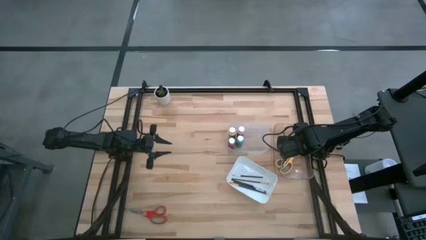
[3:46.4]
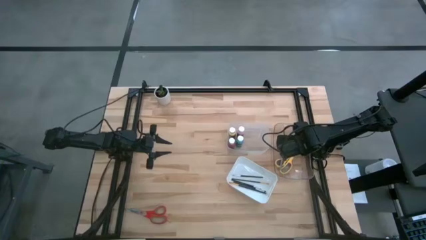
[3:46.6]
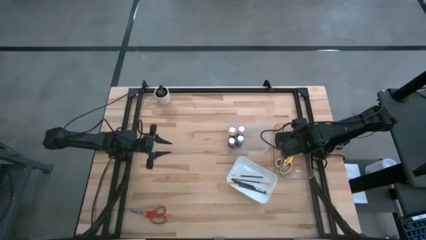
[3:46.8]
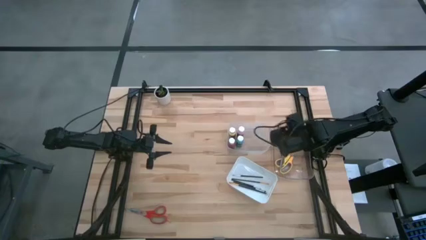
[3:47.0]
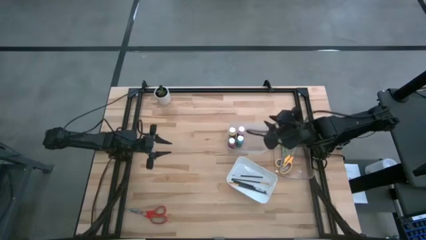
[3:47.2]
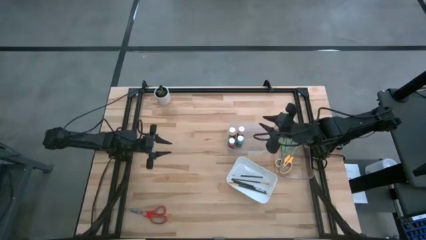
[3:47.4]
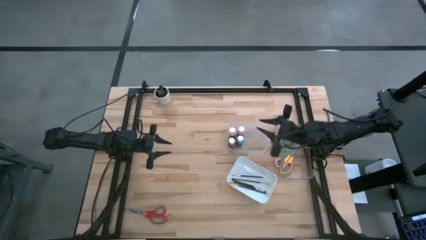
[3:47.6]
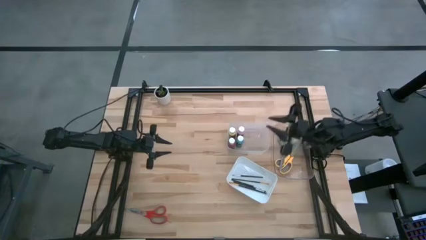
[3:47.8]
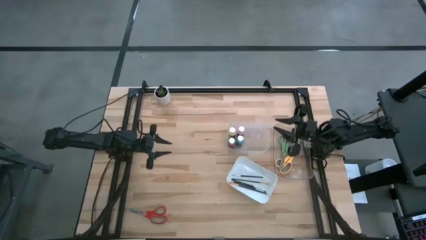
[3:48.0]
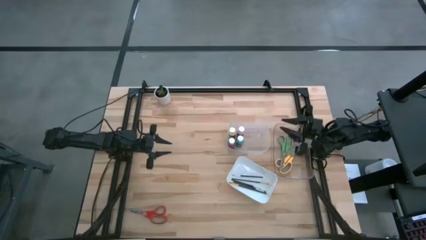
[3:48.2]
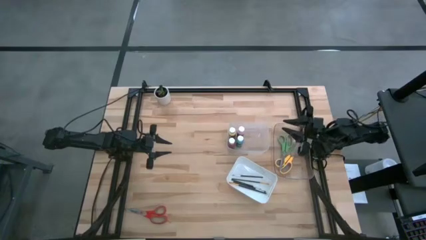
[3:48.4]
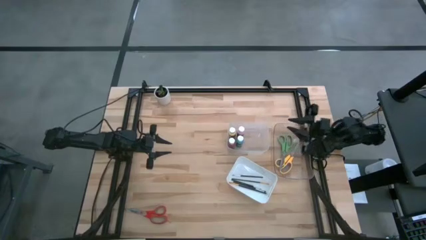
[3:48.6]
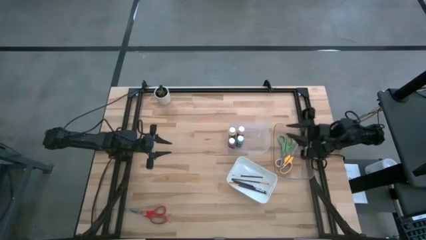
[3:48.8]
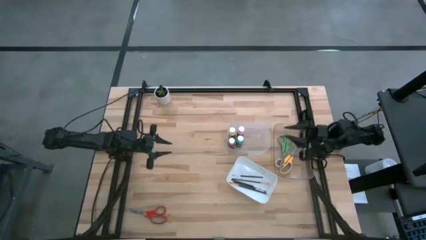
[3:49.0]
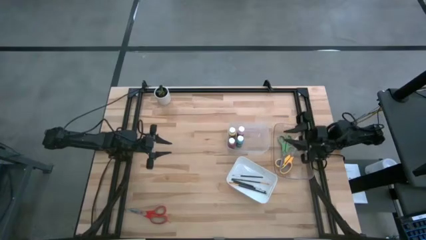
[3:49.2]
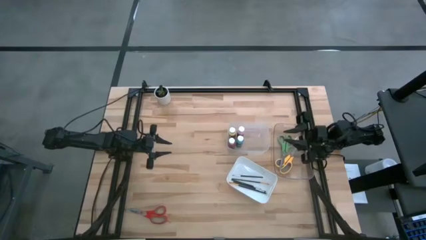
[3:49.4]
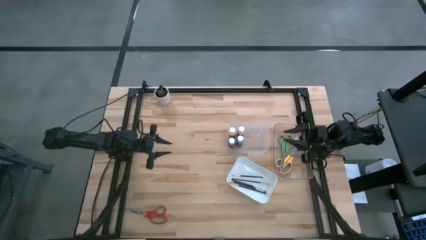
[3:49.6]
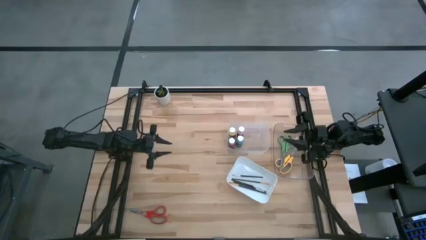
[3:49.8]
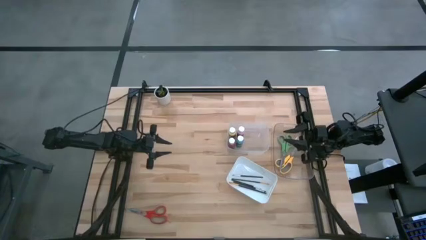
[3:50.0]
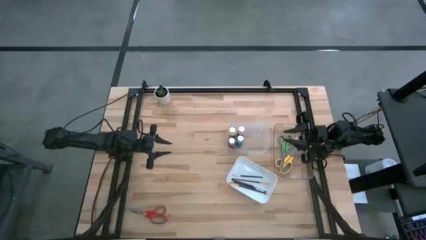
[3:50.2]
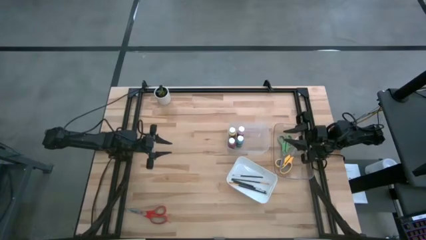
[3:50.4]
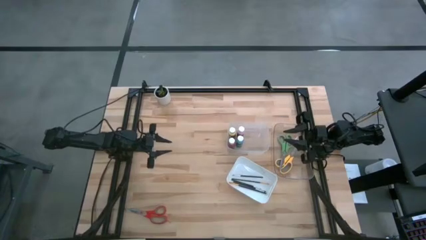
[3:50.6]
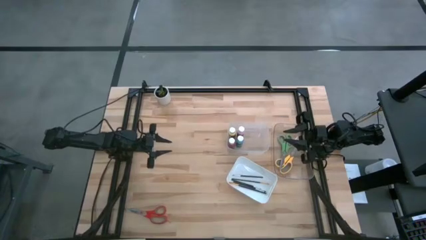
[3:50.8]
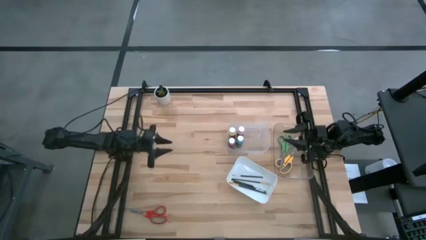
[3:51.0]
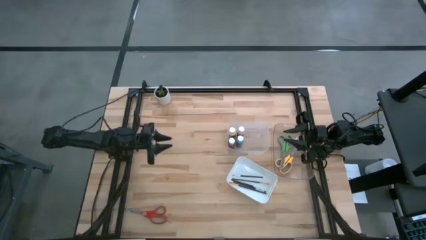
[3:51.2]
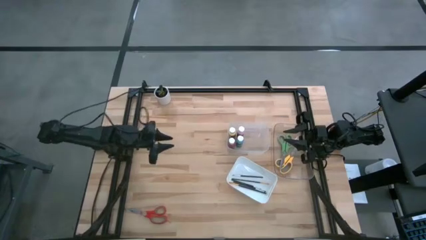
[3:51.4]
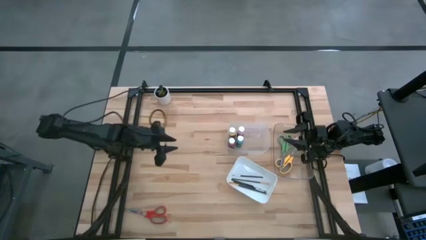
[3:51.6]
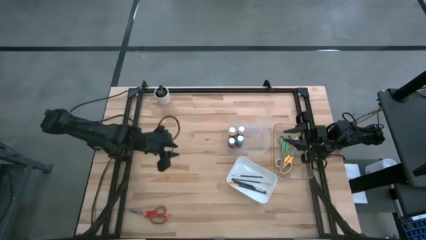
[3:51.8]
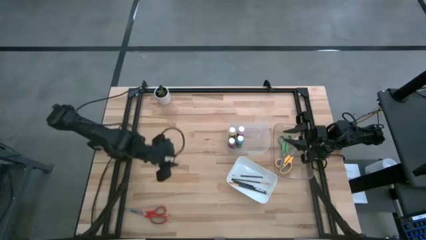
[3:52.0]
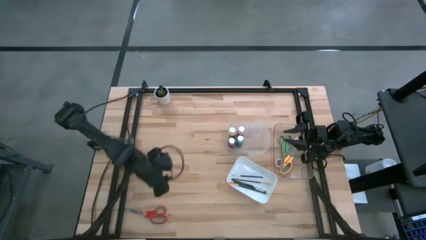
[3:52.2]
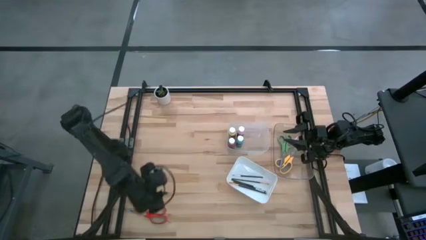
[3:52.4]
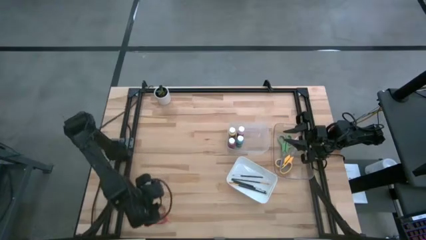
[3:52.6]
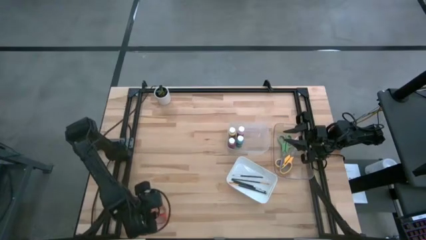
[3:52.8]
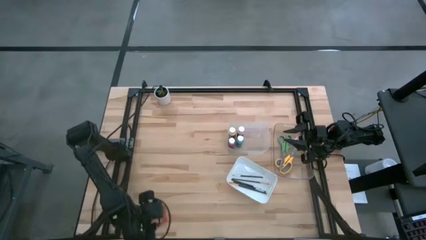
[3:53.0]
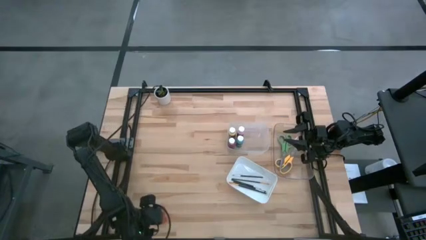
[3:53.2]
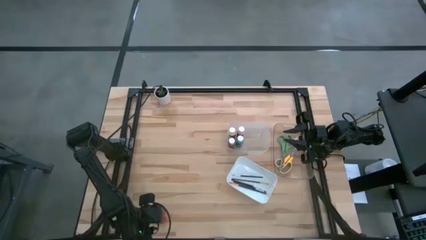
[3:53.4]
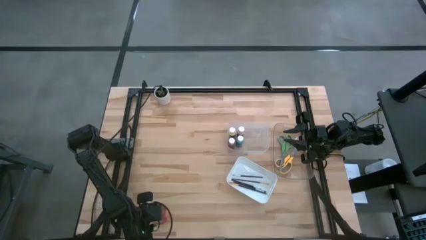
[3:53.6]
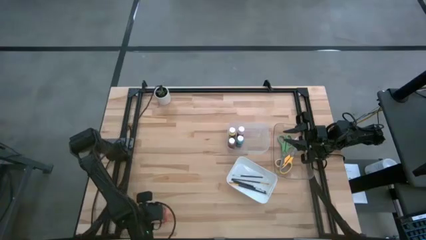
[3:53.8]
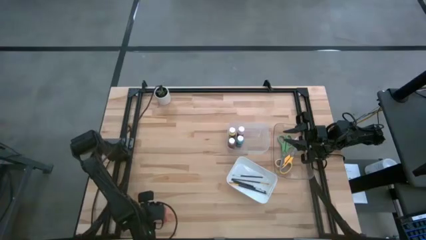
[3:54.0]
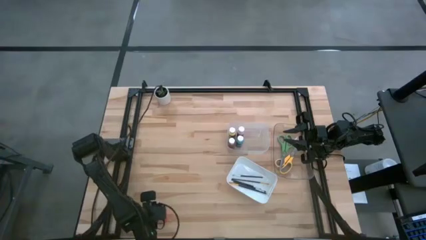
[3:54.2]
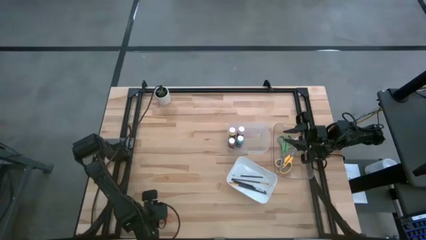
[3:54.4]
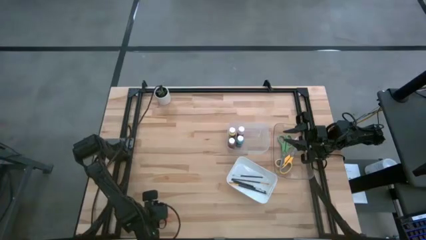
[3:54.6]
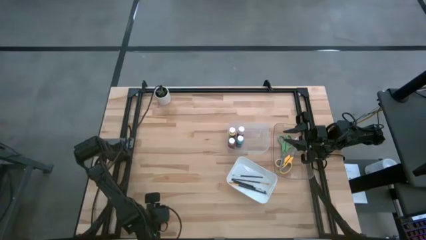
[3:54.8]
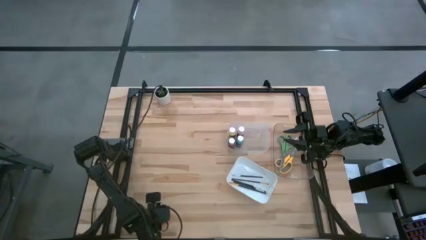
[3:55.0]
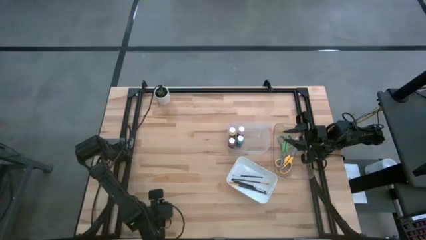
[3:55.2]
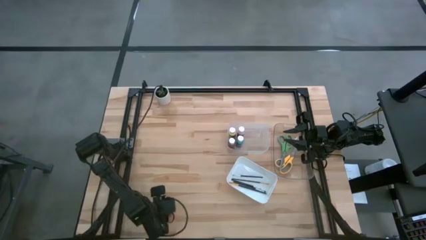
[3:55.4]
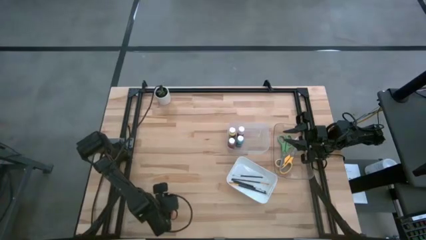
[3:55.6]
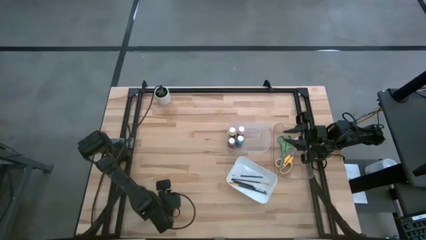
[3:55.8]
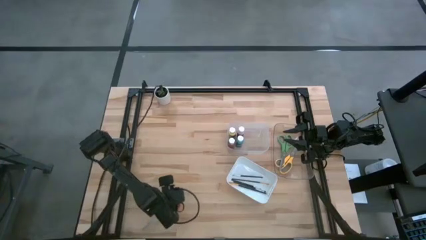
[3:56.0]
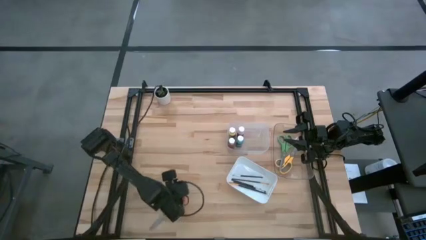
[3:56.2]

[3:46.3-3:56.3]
Task: Pick & Place Paint Supplies
Put the red scissors into the right transparent bin

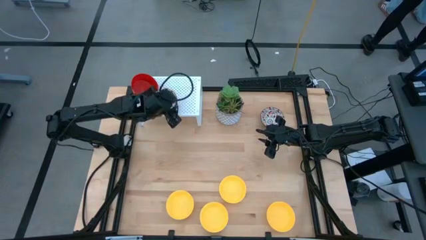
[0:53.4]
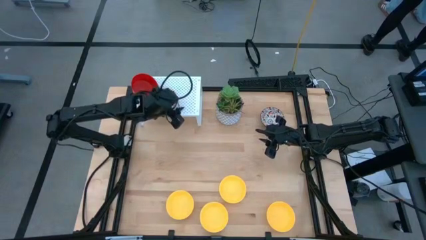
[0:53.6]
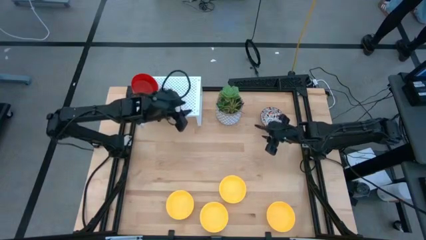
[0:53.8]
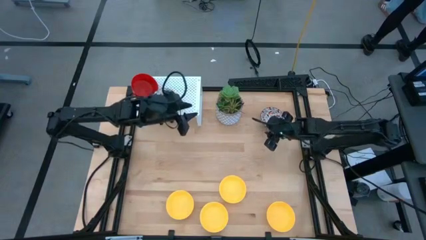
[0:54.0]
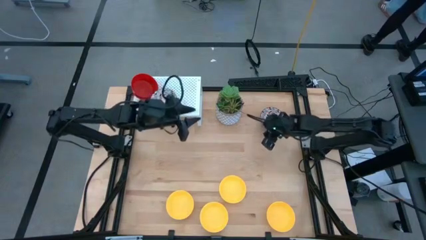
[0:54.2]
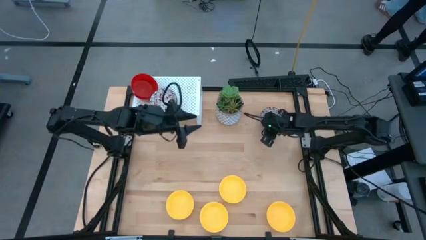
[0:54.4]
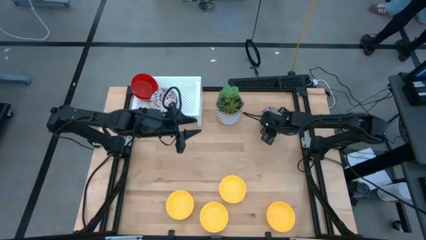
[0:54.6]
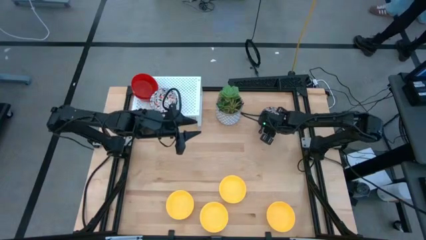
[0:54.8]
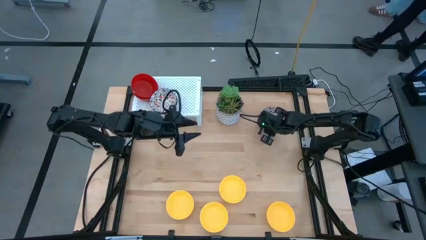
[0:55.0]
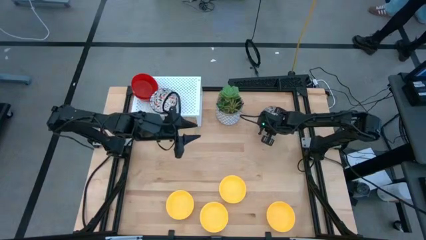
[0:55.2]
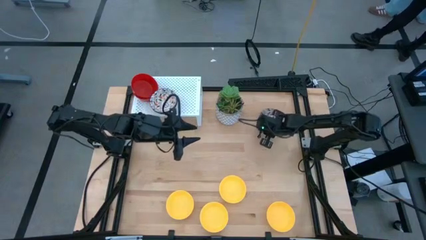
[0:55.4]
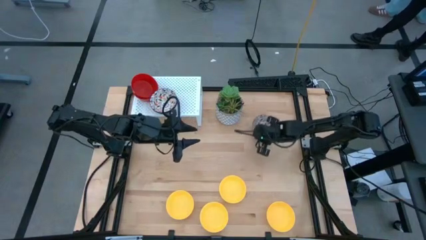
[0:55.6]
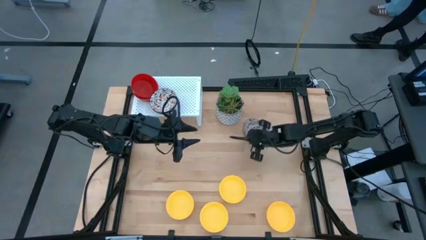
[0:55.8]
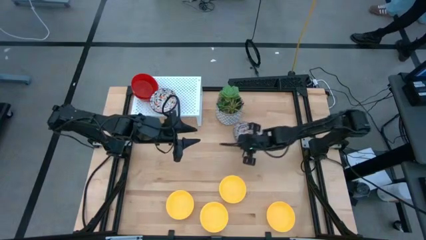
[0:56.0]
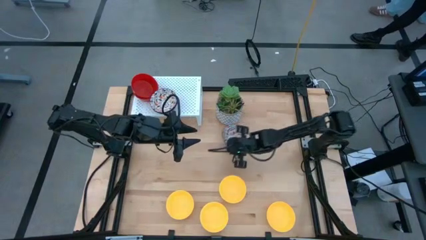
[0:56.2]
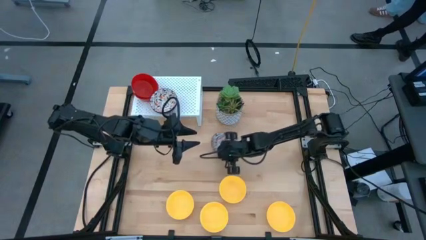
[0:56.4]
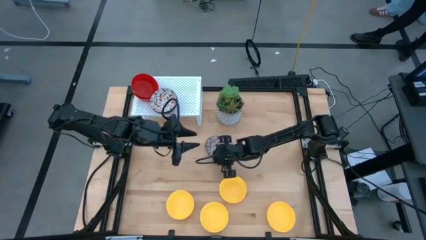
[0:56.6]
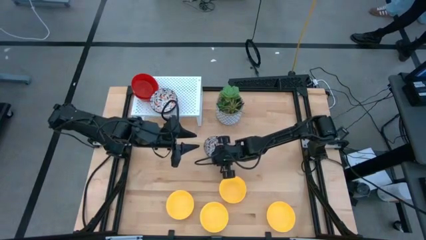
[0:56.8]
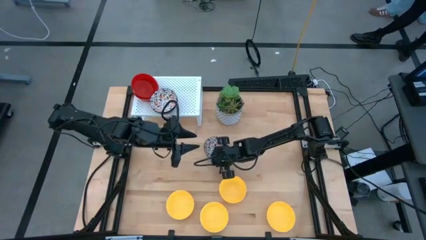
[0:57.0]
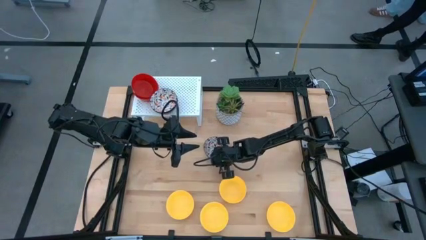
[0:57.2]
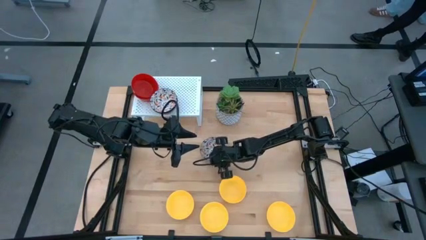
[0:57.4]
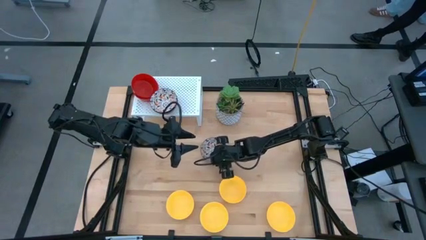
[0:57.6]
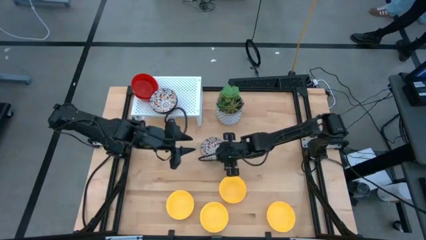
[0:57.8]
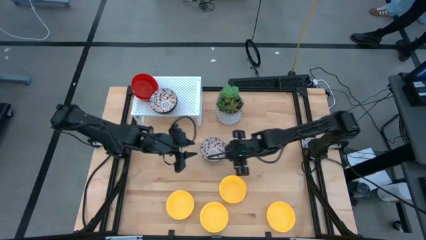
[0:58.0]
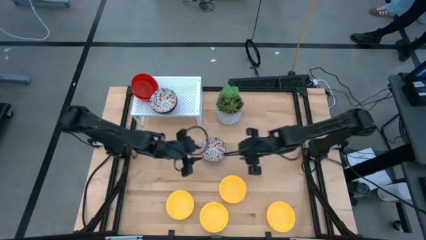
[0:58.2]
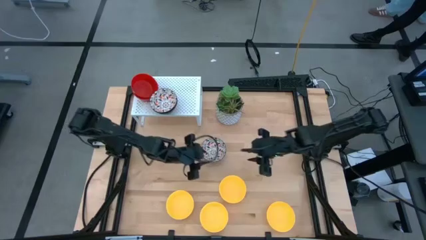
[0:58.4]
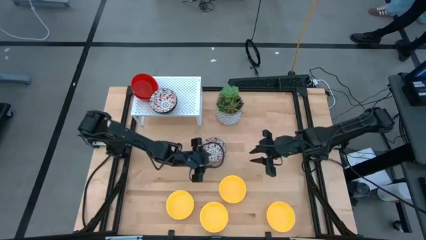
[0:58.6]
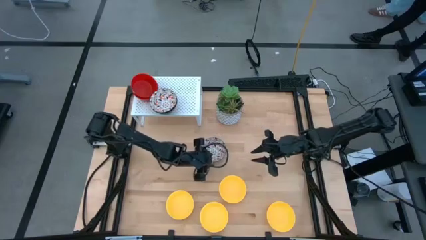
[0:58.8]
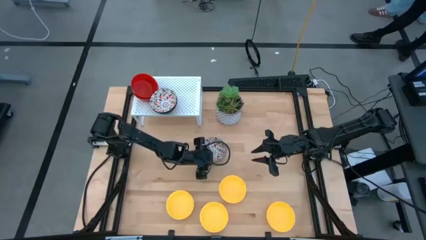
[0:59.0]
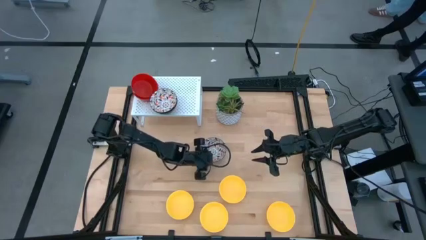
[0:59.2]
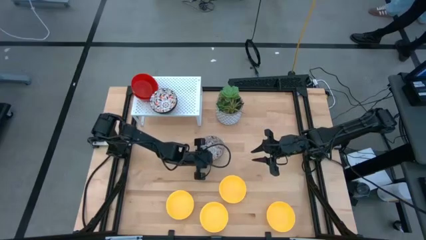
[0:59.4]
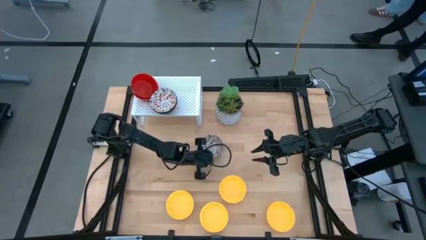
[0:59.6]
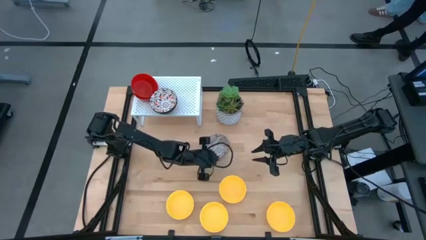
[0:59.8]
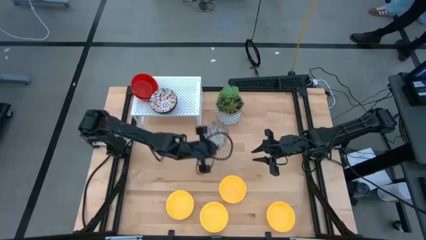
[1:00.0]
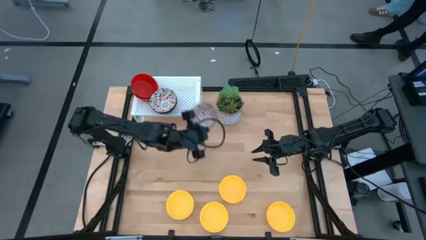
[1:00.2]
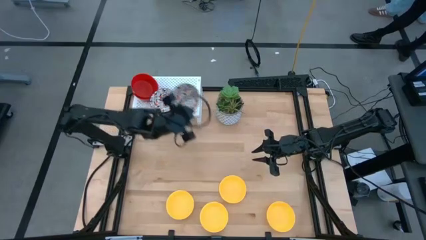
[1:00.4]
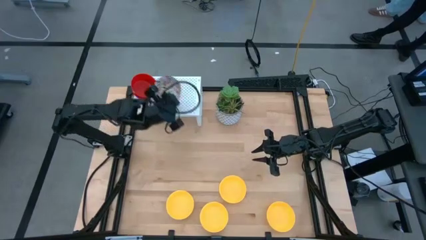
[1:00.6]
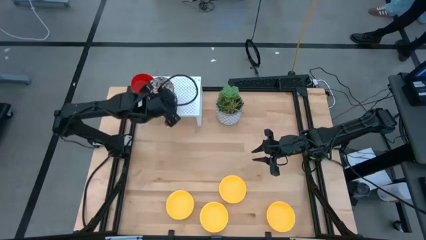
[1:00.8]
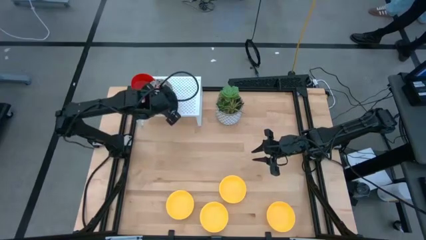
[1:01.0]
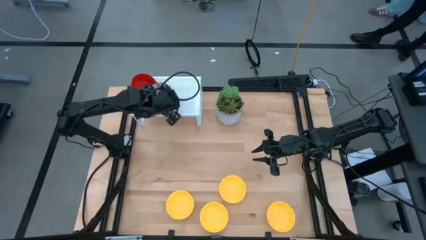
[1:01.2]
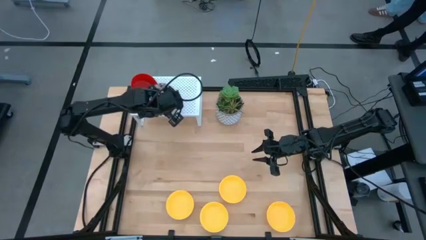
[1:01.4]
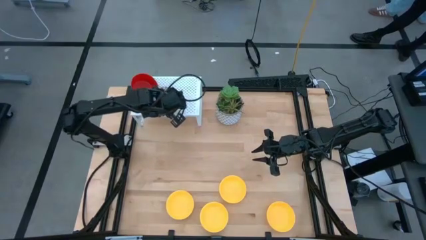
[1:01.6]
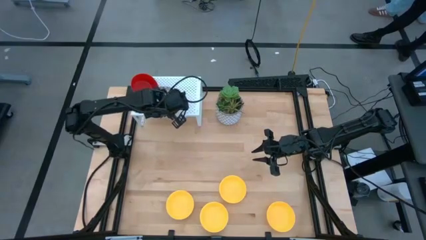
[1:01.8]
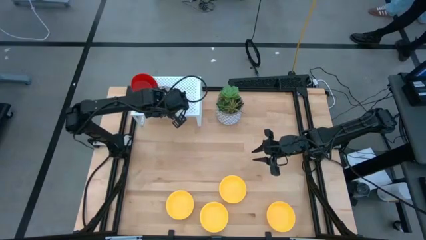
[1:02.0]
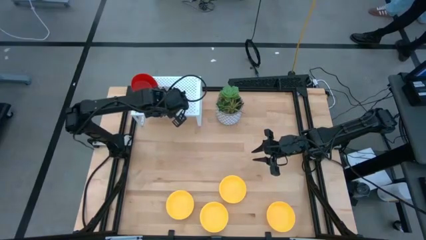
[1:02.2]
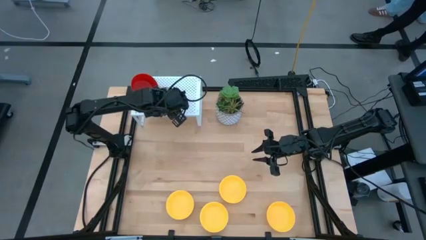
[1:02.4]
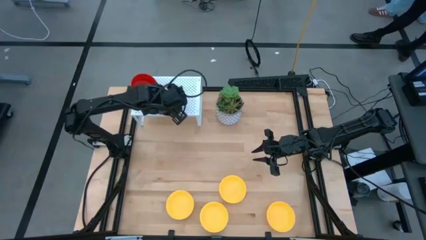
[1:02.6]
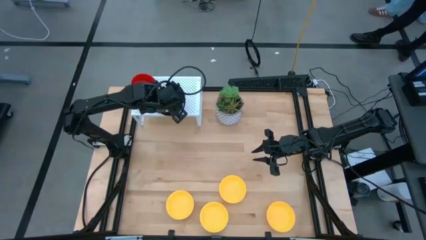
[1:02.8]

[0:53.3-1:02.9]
Task: Pick & Place Mini bowls
Stack the white patterned bowl on the white patterned bowls on the shelf
